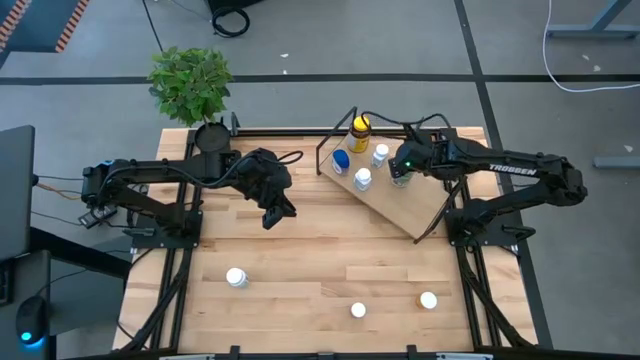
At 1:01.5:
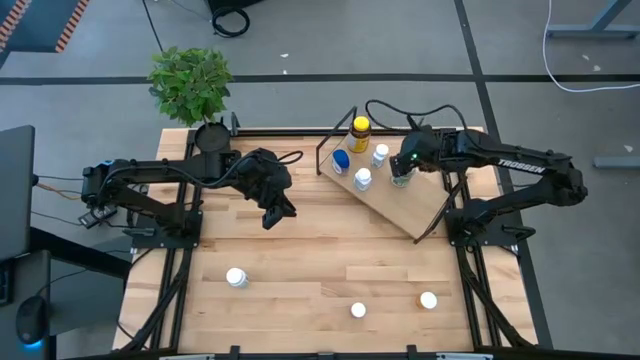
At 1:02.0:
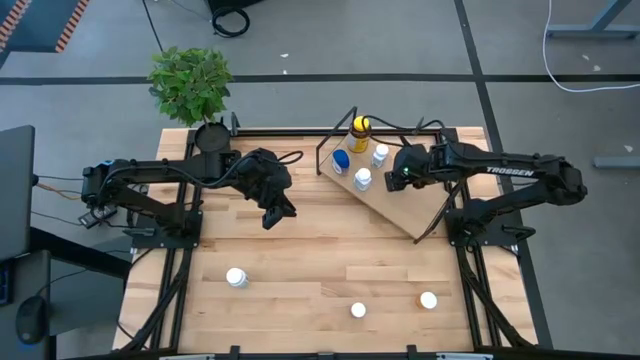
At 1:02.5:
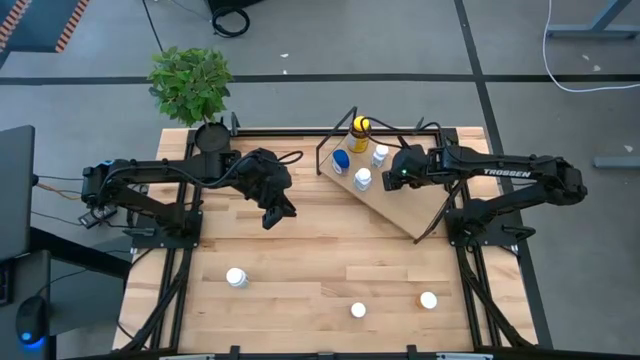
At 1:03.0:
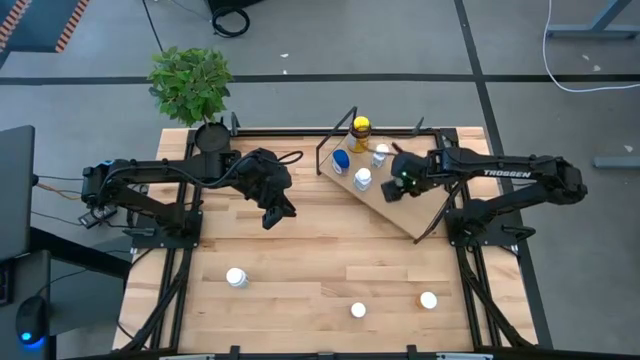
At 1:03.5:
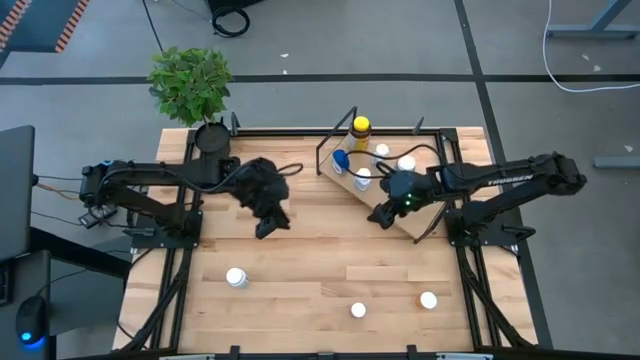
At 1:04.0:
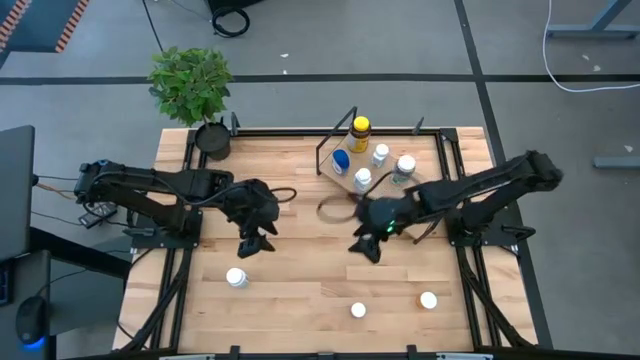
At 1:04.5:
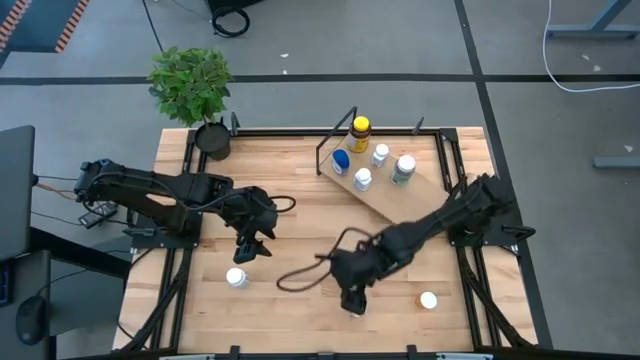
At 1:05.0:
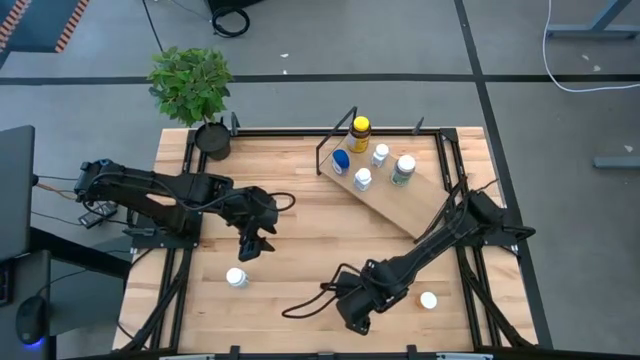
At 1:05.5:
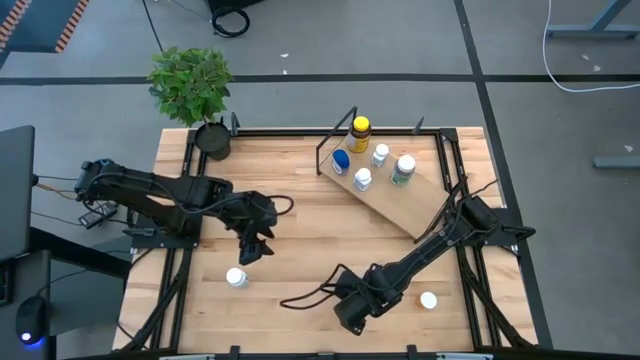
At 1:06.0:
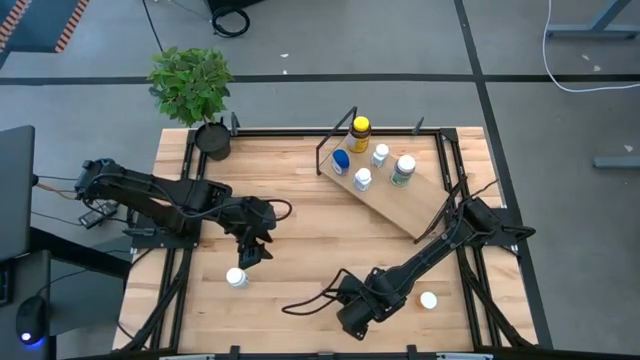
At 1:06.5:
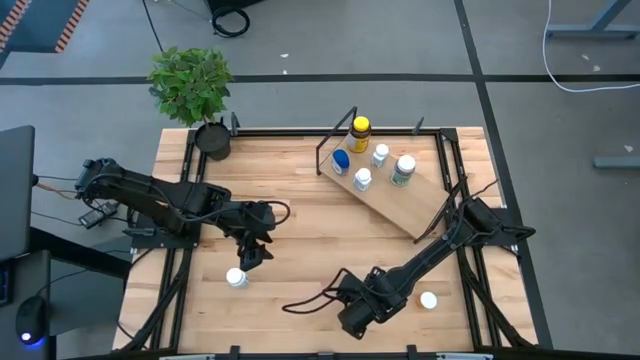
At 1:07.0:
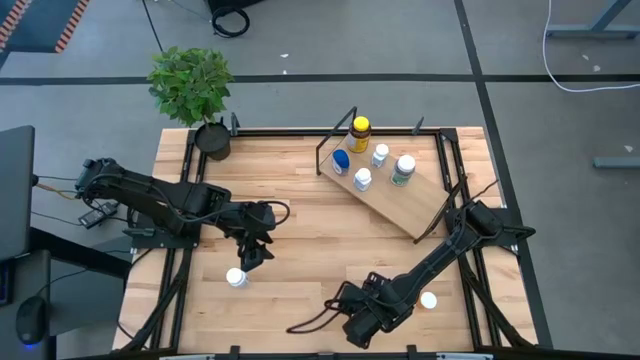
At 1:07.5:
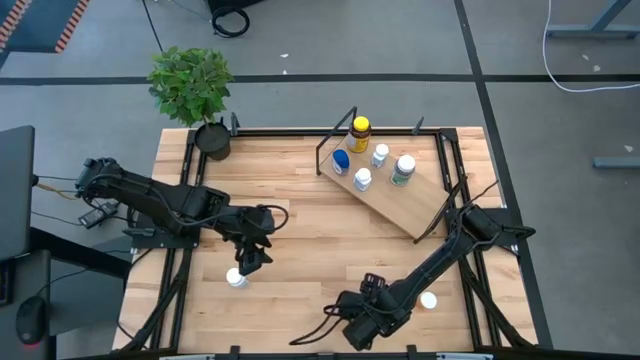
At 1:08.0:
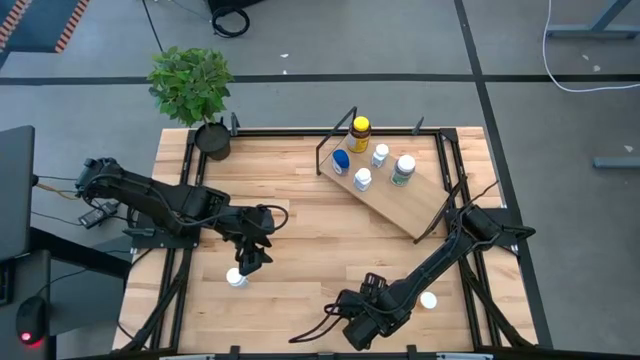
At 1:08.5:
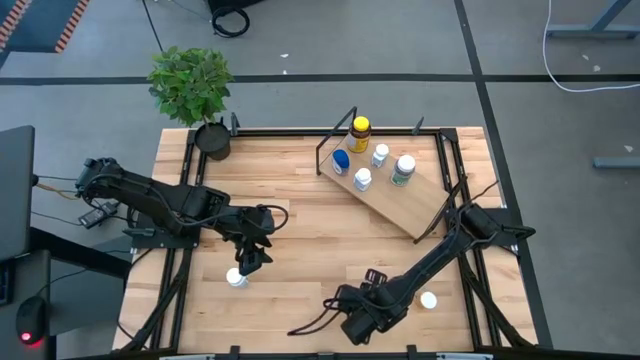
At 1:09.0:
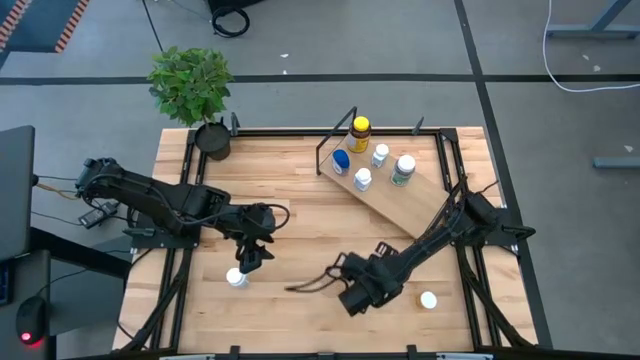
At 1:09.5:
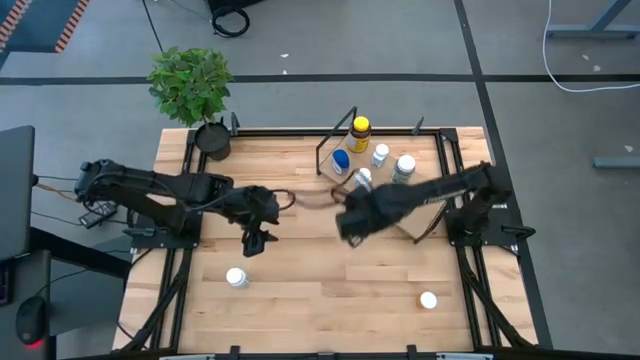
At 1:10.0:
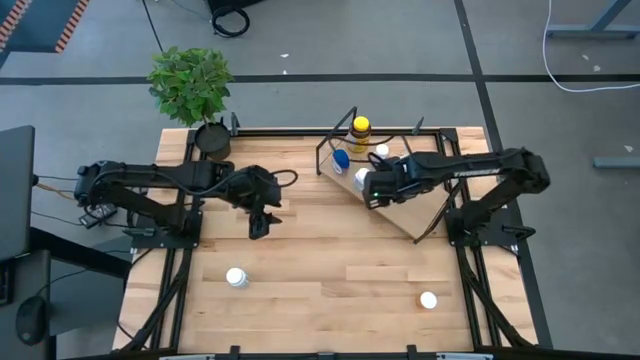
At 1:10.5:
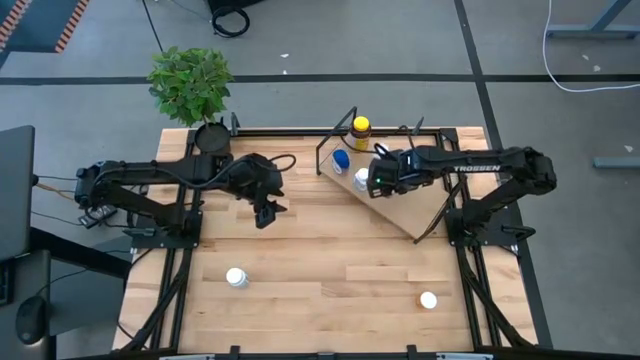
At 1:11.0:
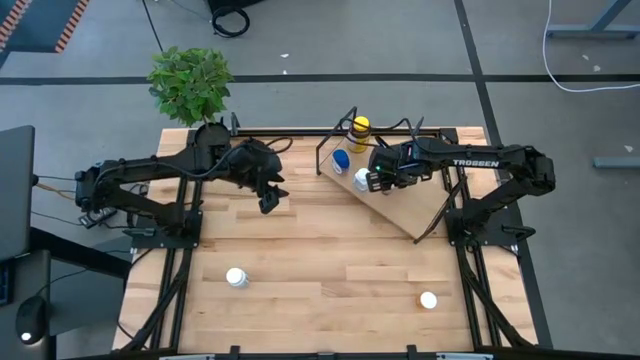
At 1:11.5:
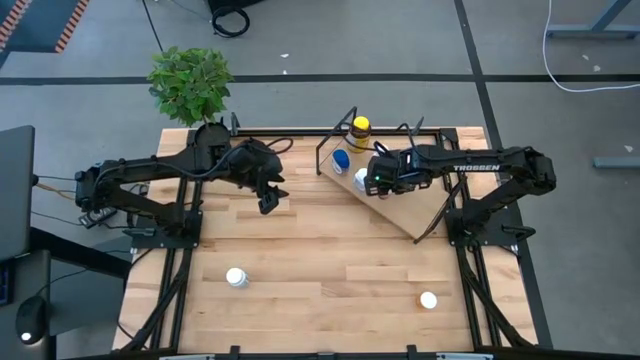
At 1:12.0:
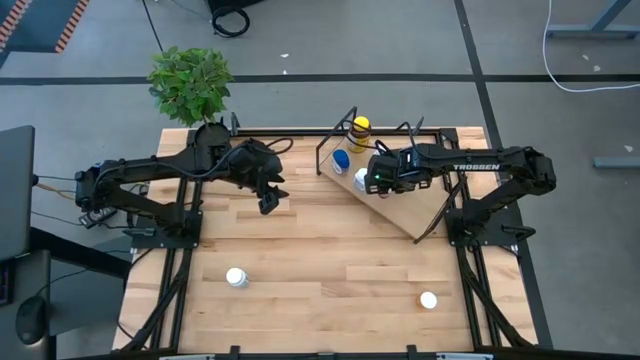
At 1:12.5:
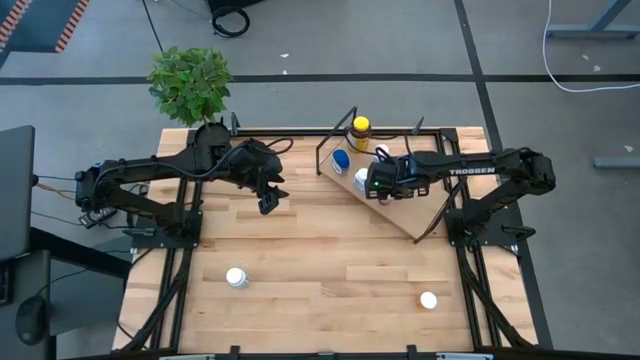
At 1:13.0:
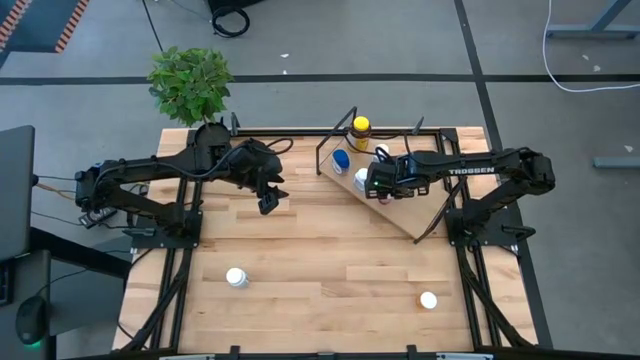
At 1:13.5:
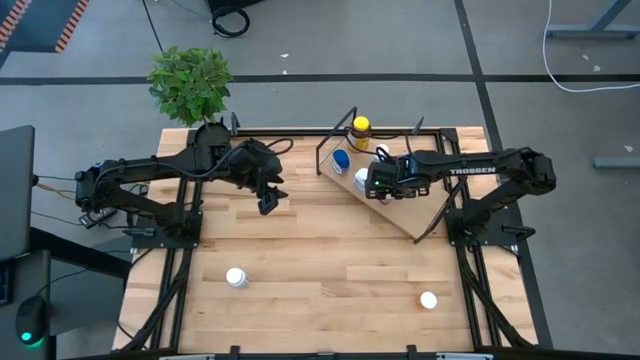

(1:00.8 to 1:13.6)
Task: Pick and place medicine bottles onto shelf by color
Put the pink medicine bottle on the shelf

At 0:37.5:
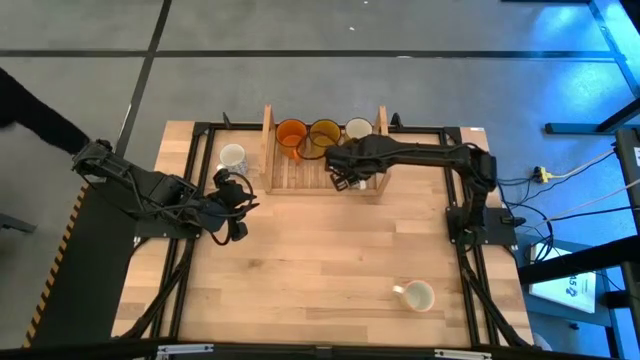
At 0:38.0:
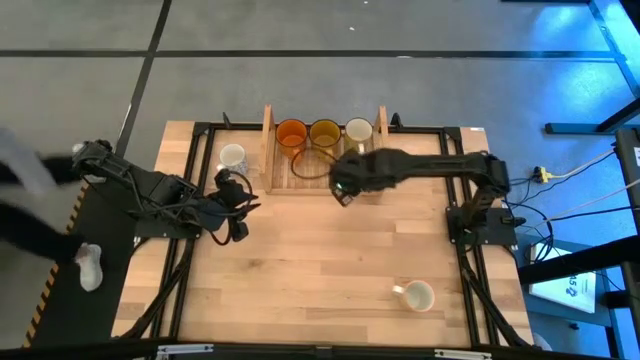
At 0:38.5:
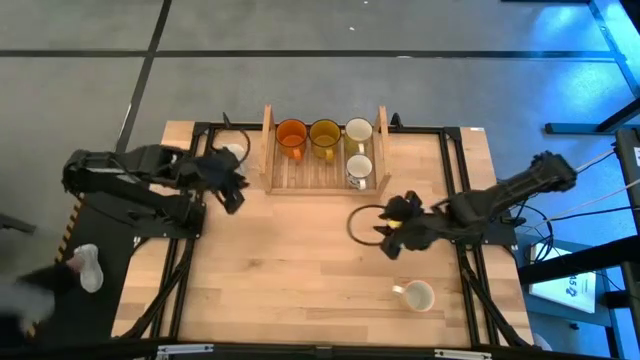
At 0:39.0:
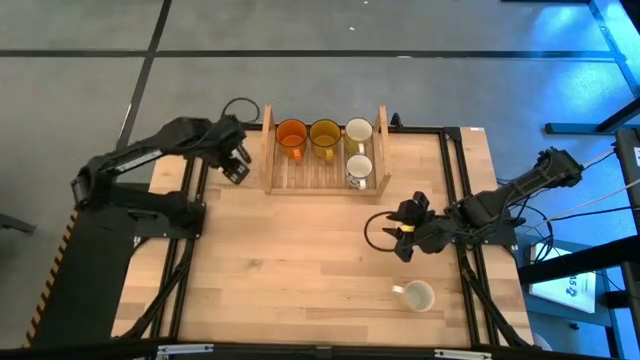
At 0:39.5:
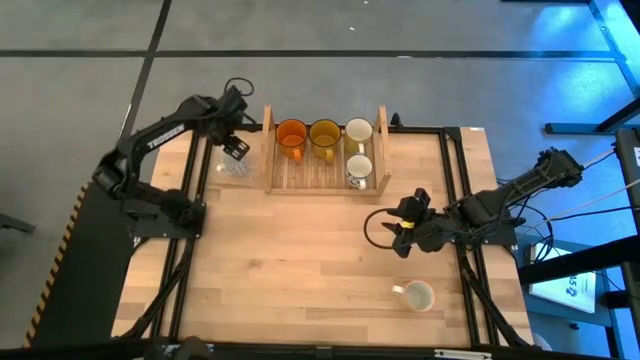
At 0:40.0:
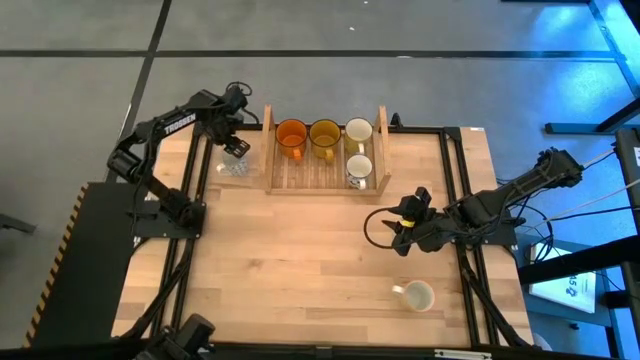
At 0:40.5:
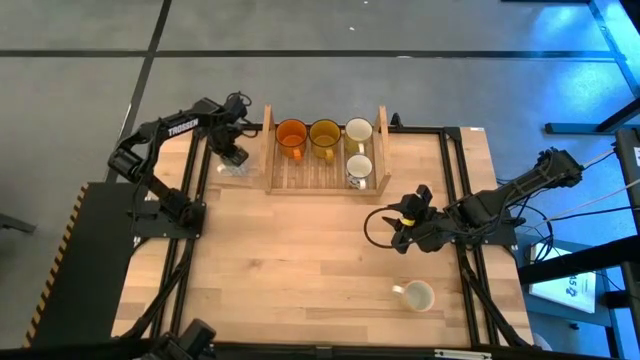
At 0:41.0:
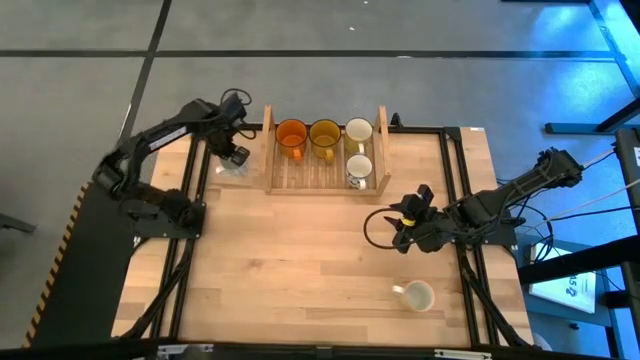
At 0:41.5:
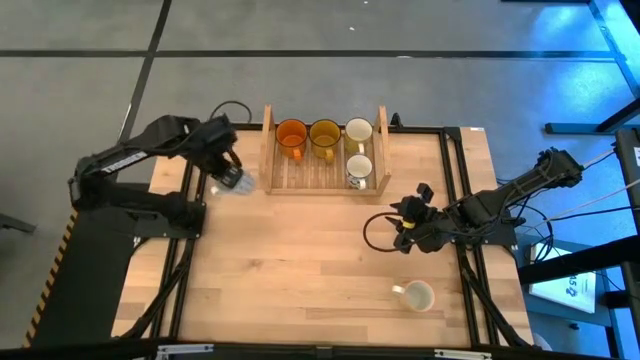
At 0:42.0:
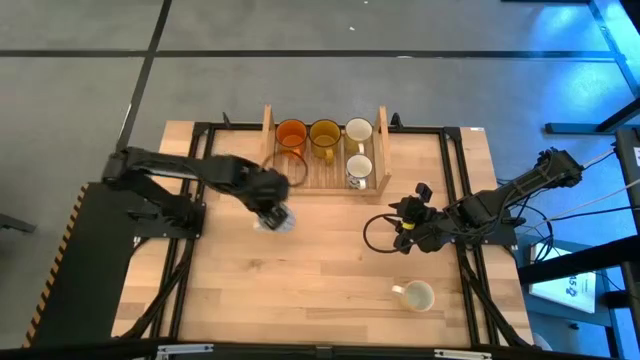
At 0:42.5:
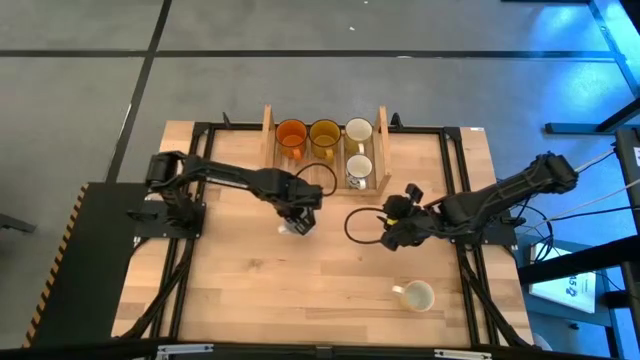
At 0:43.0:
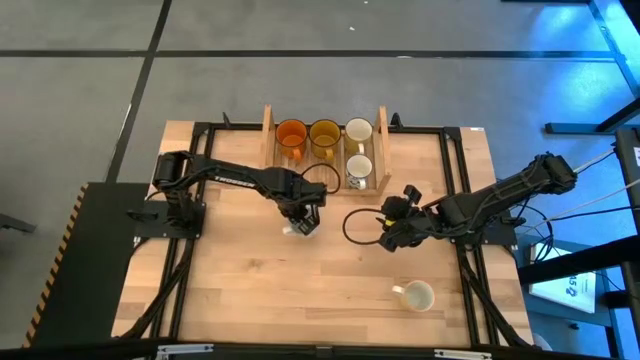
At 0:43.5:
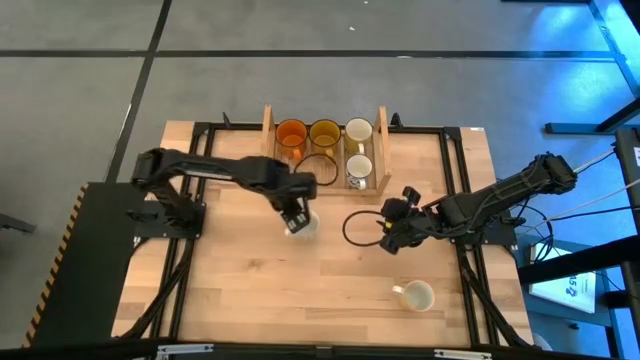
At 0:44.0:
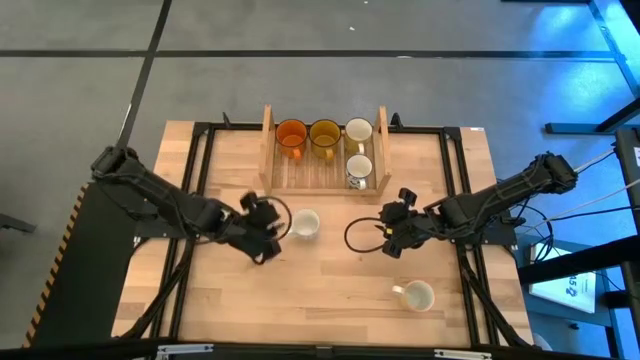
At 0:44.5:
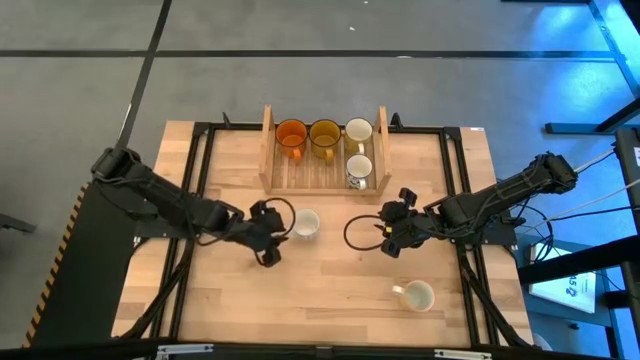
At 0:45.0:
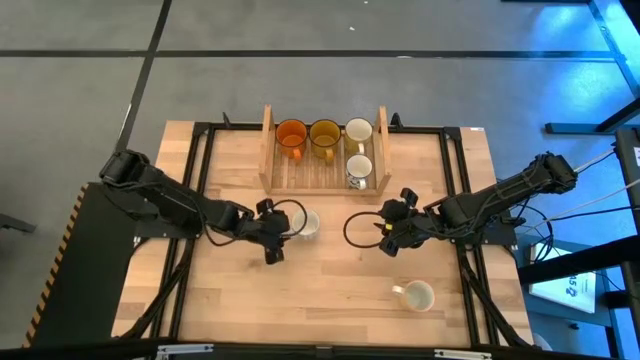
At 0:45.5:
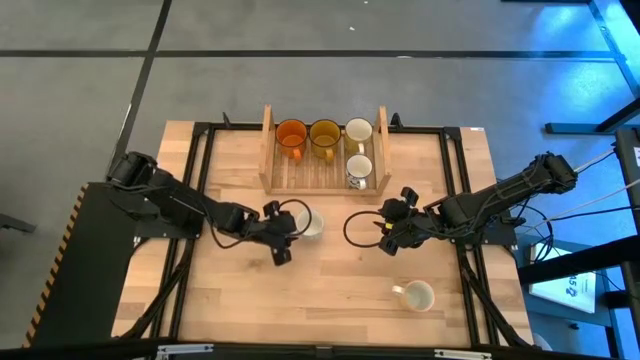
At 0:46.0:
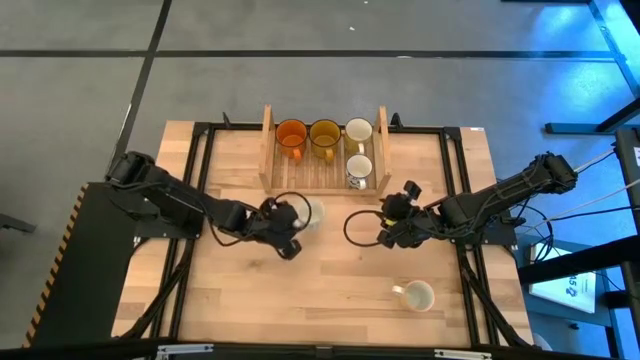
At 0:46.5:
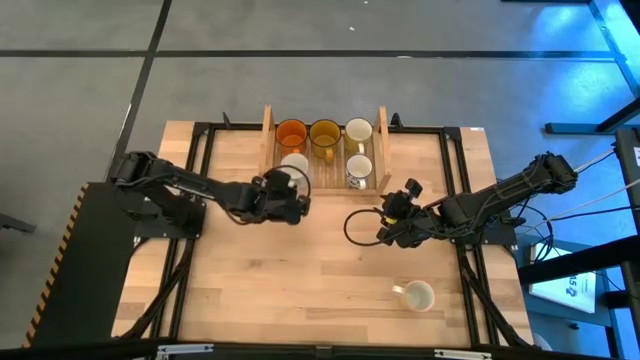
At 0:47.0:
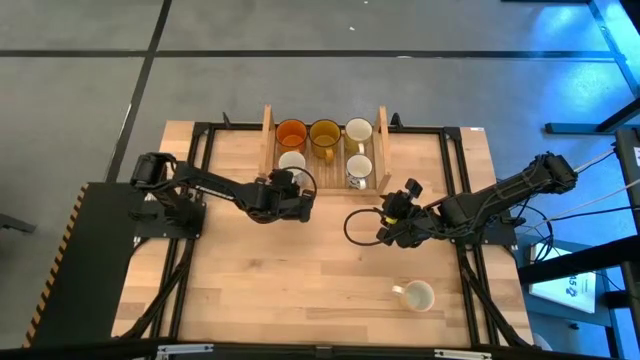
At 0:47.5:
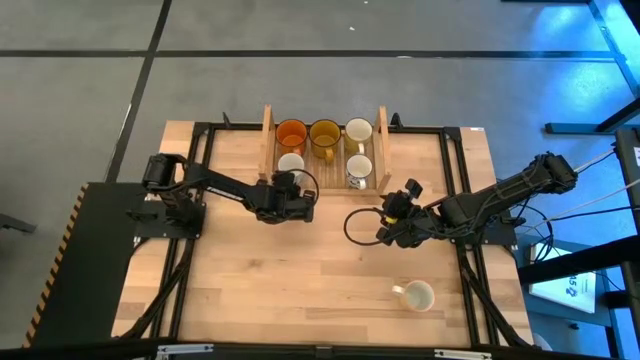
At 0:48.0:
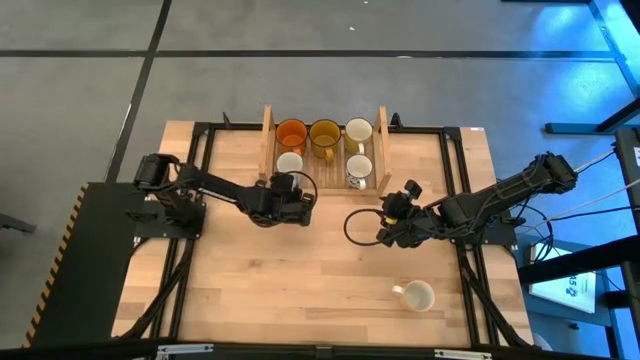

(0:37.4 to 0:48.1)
Task: Place coffee mugs
Put the light blue mug on the shelf
